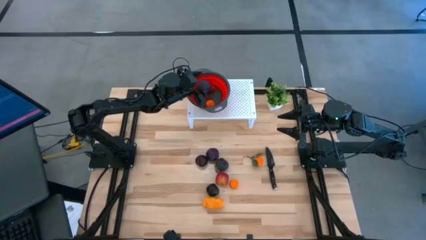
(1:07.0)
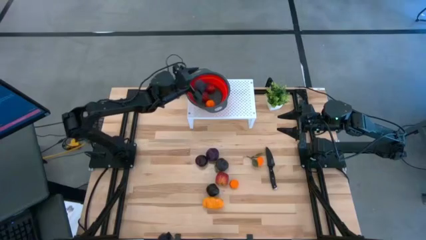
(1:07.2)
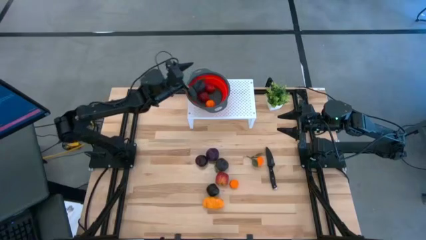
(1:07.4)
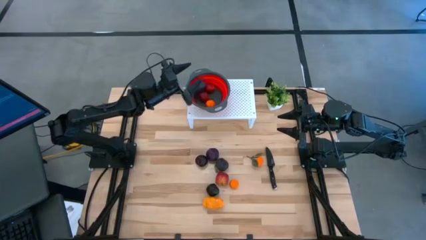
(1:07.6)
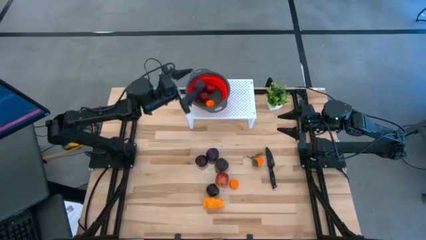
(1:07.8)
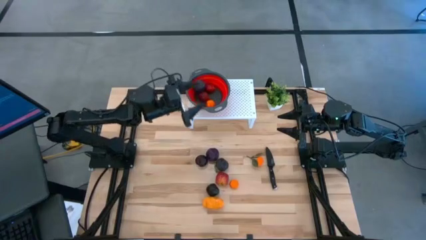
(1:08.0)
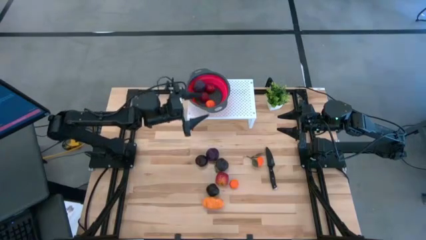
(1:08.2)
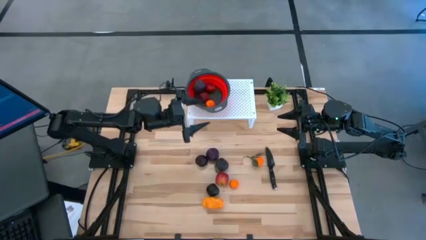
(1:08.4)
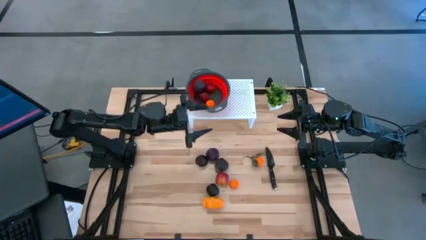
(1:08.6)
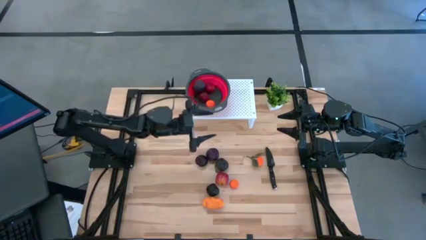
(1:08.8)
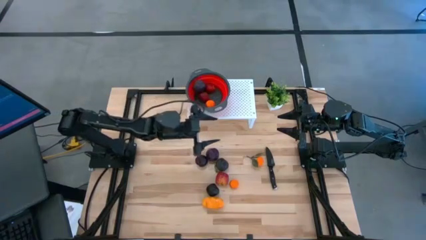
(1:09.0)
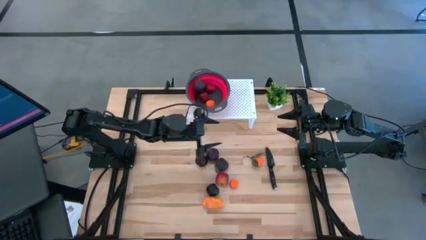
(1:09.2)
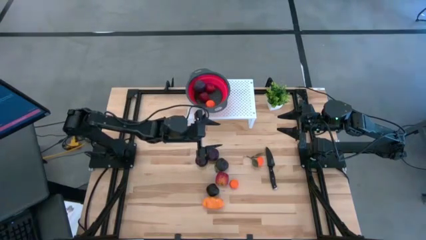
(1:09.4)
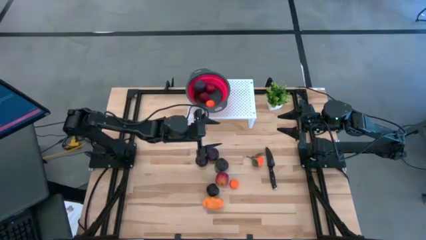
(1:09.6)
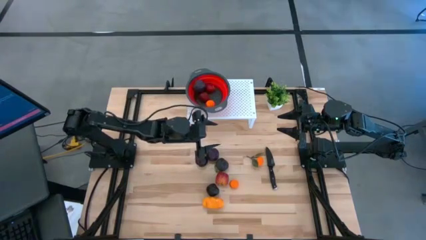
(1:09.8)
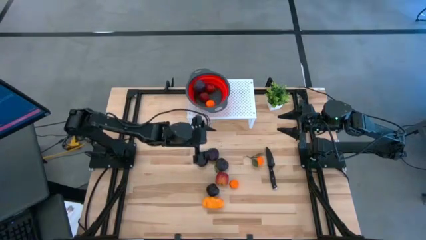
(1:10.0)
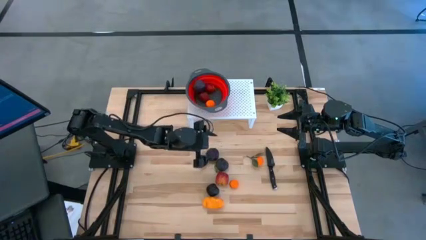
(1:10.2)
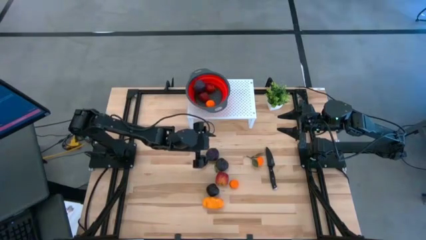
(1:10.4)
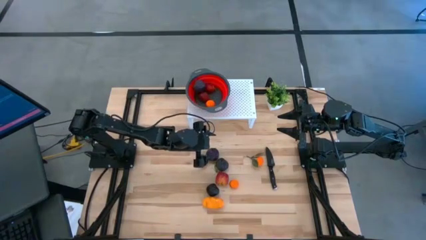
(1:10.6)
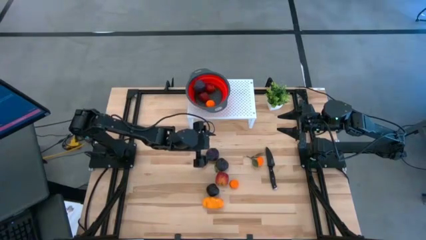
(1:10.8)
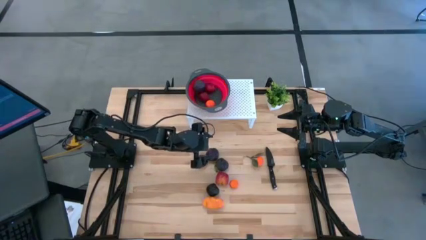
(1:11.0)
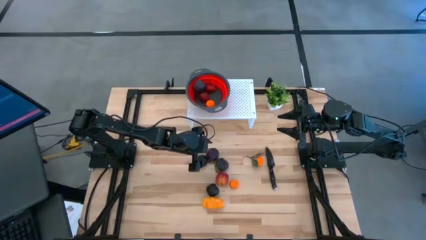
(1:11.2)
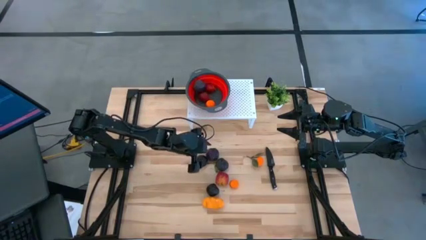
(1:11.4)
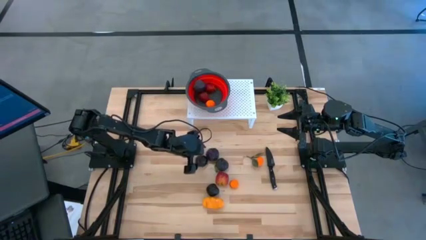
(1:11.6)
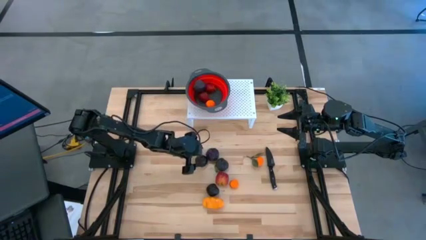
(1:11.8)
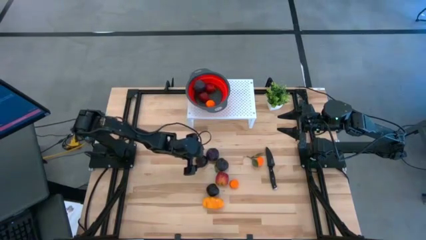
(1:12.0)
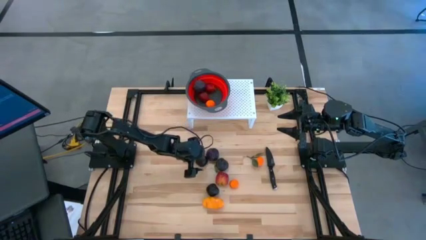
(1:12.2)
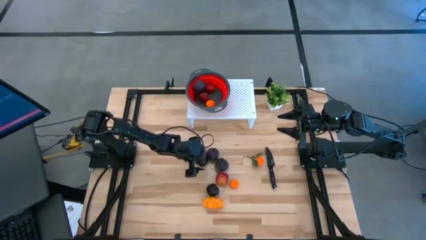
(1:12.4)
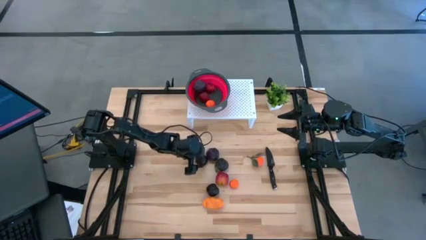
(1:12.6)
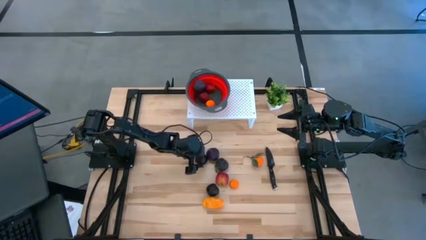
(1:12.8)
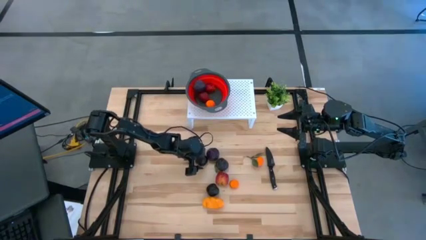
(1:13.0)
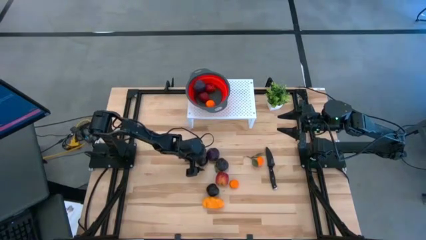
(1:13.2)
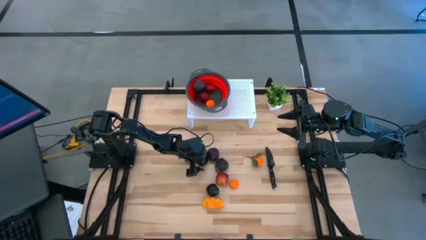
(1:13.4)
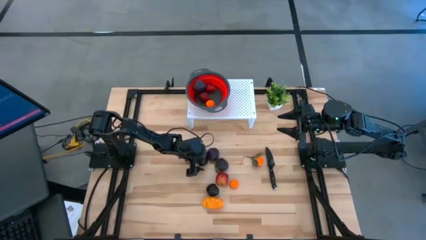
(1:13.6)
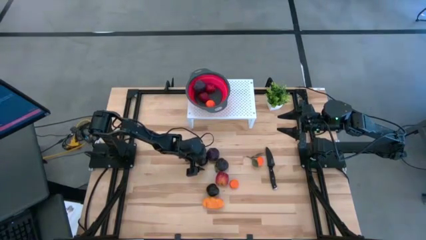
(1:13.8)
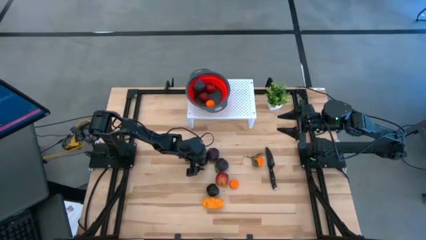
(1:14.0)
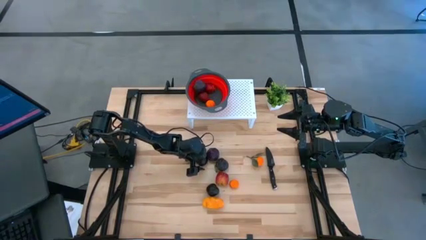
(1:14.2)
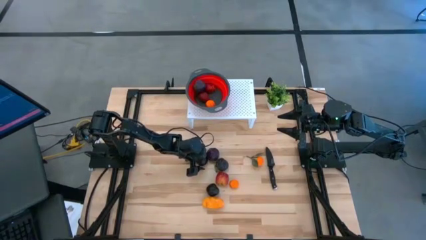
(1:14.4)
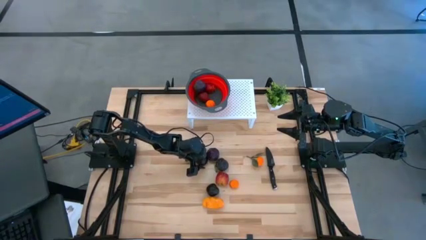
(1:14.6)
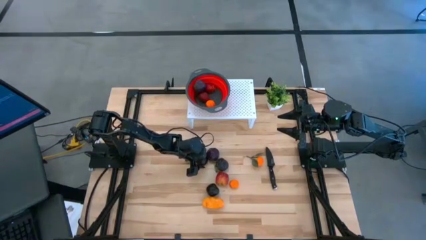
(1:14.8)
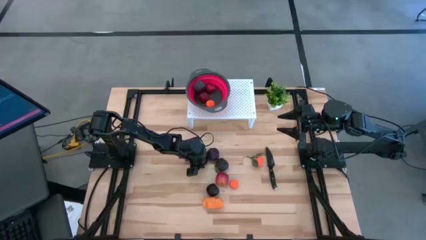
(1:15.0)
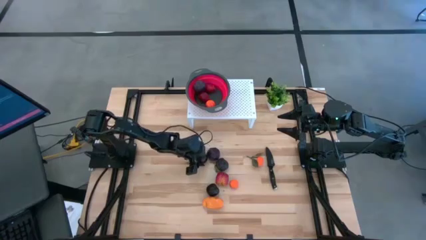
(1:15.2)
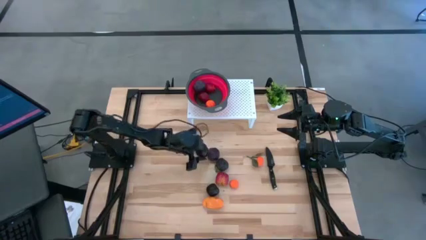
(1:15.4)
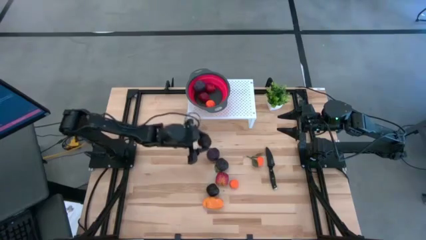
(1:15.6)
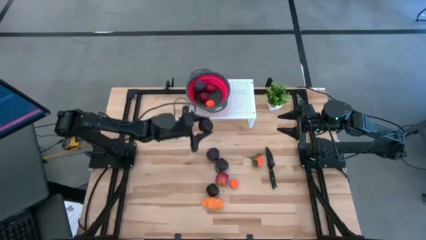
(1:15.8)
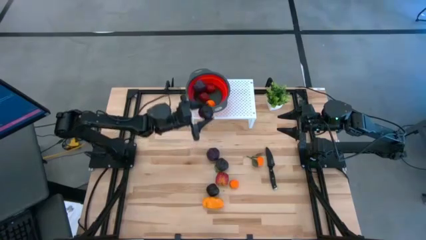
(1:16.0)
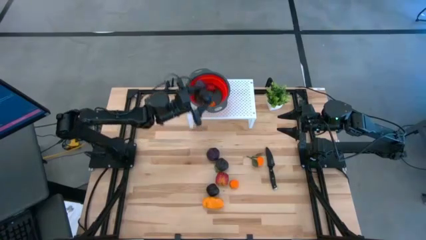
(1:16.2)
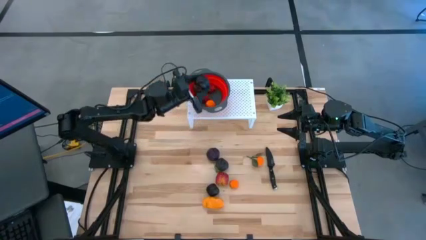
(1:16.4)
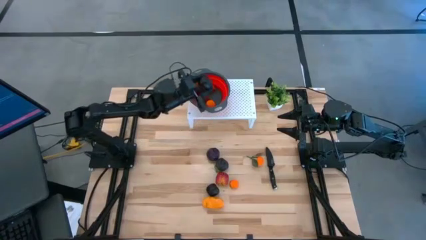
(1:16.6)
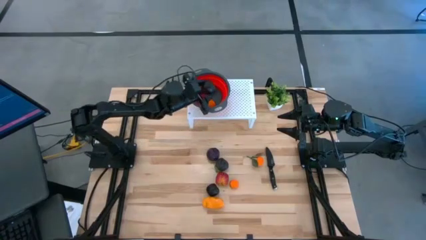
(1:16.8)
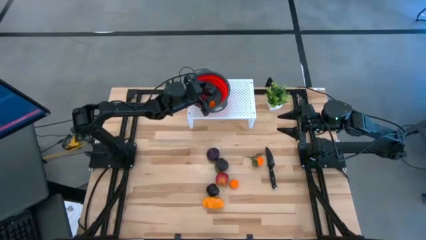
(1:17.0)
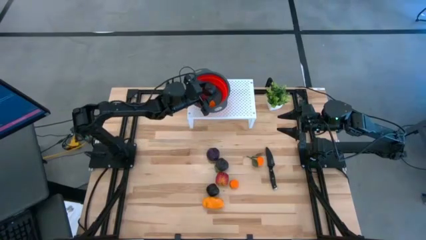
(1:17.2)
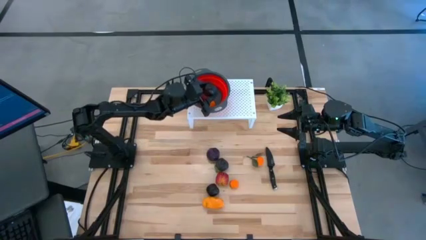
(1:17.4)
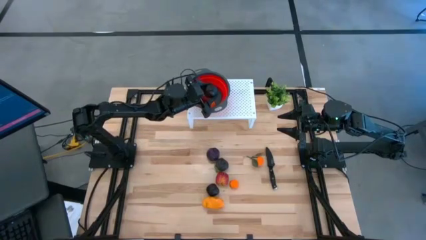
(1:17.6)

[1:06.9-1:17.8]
Task: Pick & Place Fruit
Put the top left plum into the strainer bowl on the shelf
